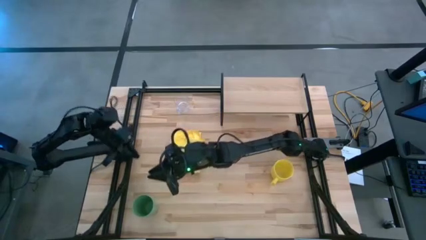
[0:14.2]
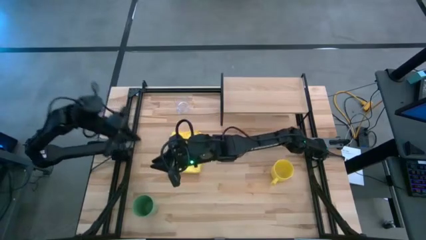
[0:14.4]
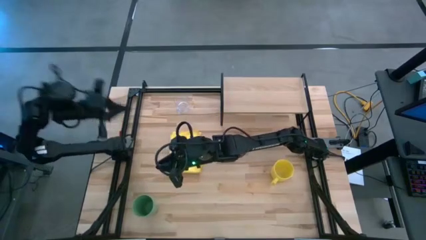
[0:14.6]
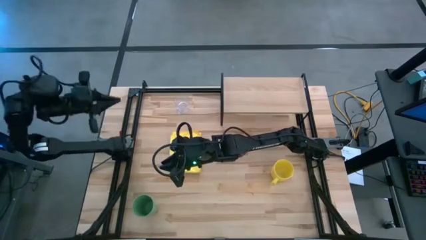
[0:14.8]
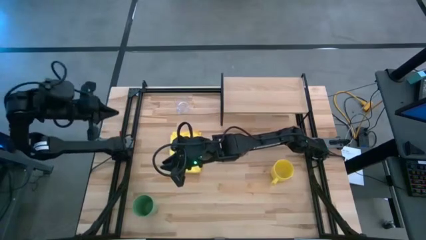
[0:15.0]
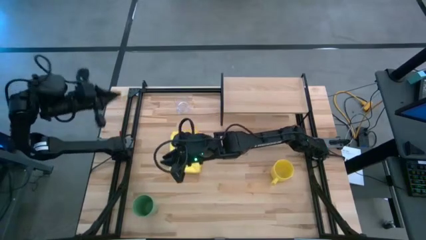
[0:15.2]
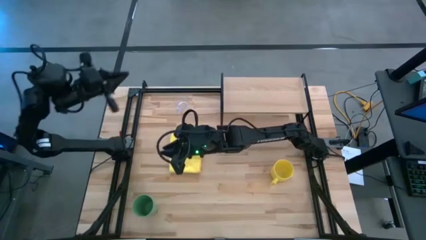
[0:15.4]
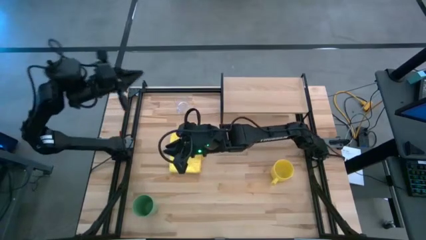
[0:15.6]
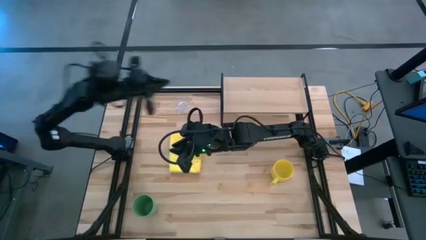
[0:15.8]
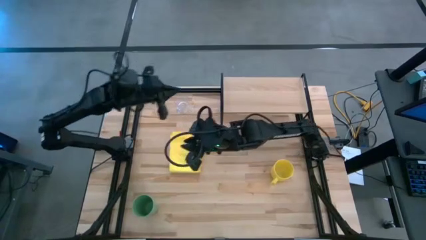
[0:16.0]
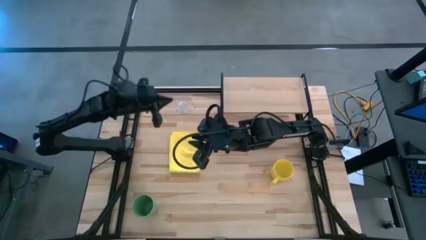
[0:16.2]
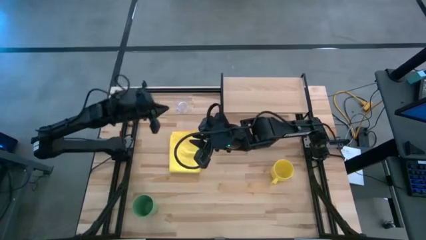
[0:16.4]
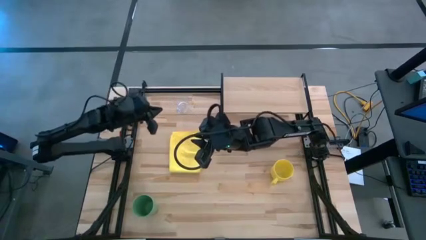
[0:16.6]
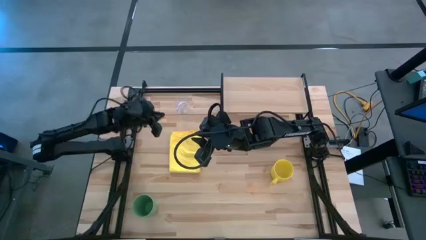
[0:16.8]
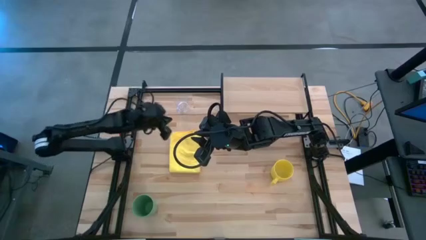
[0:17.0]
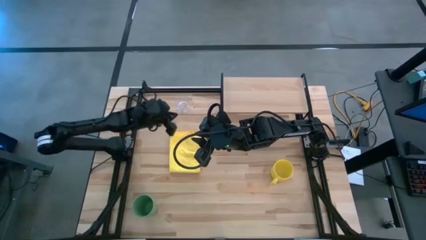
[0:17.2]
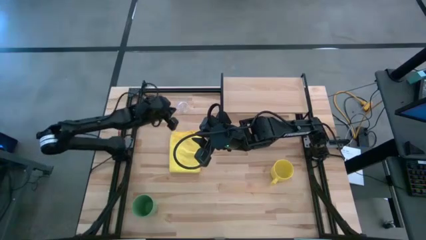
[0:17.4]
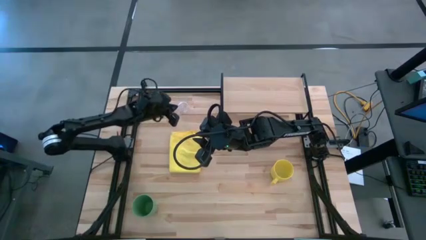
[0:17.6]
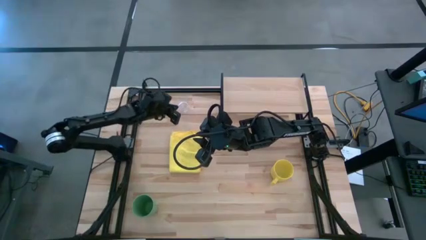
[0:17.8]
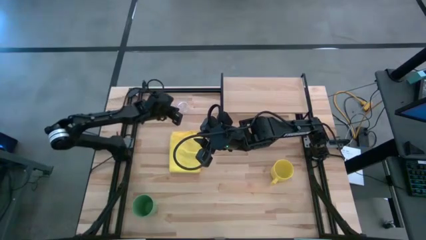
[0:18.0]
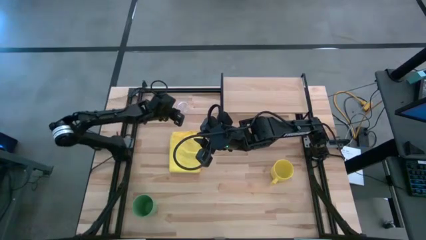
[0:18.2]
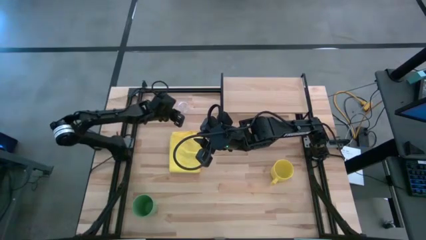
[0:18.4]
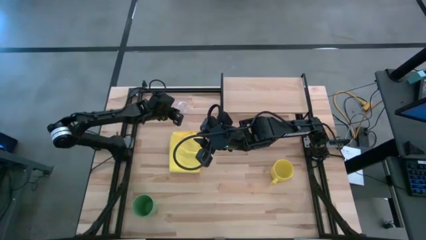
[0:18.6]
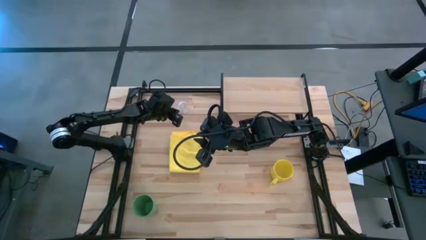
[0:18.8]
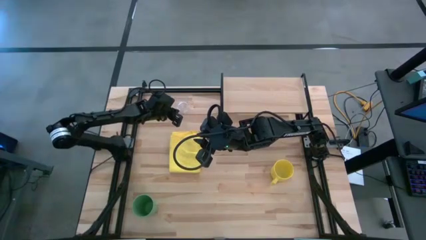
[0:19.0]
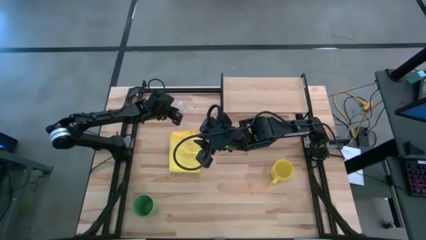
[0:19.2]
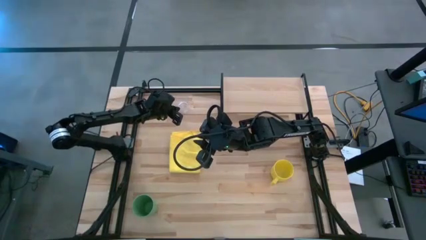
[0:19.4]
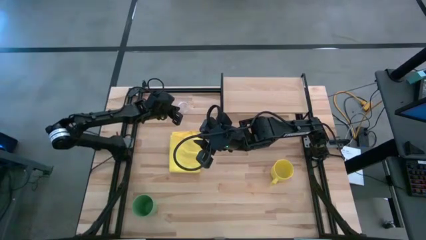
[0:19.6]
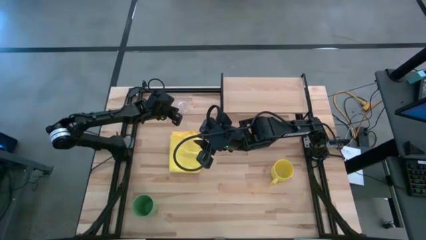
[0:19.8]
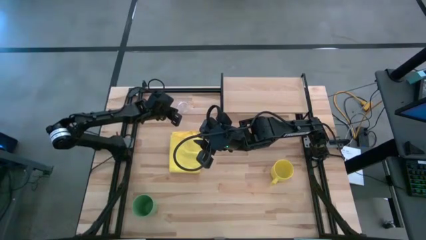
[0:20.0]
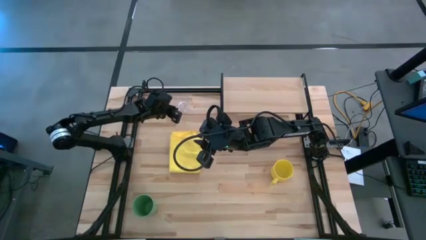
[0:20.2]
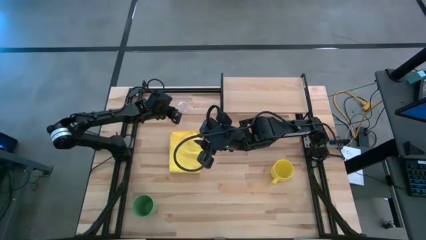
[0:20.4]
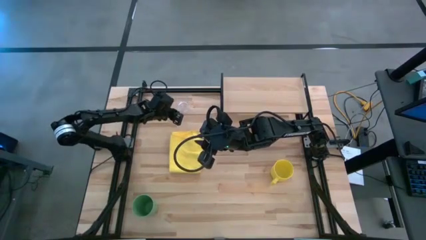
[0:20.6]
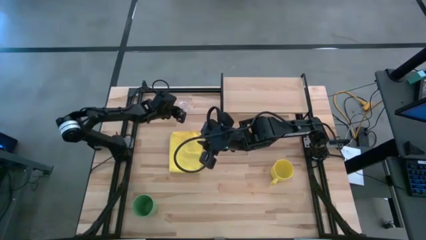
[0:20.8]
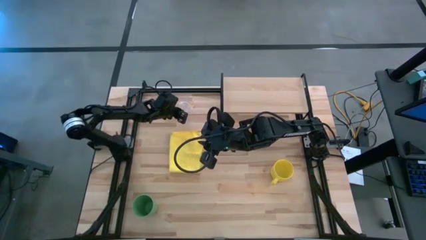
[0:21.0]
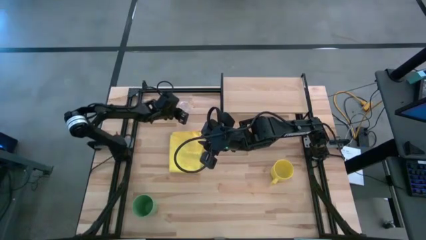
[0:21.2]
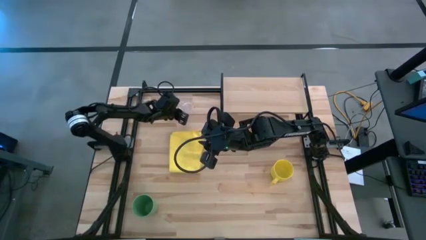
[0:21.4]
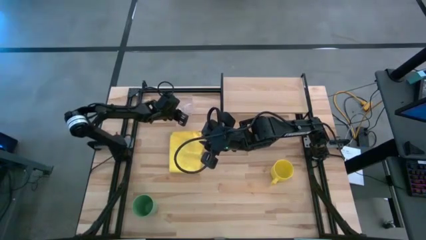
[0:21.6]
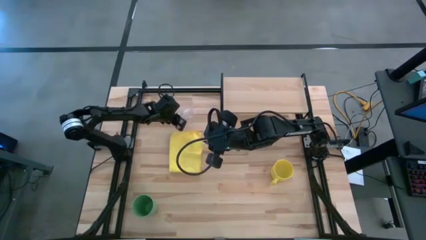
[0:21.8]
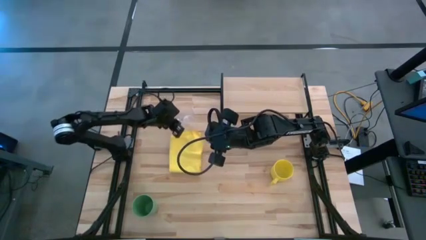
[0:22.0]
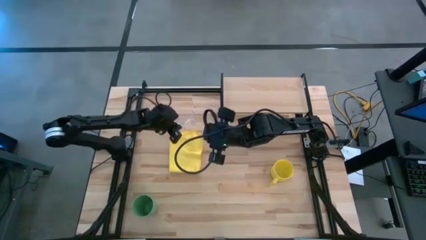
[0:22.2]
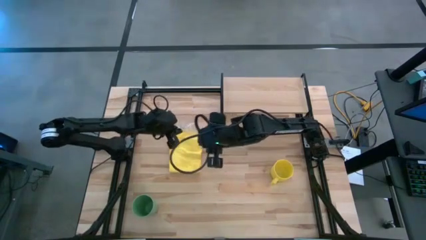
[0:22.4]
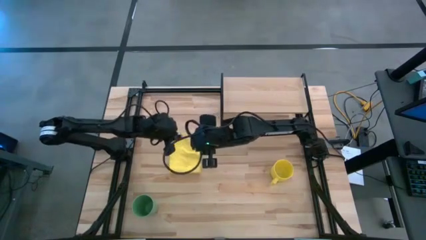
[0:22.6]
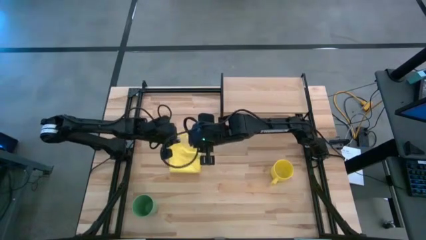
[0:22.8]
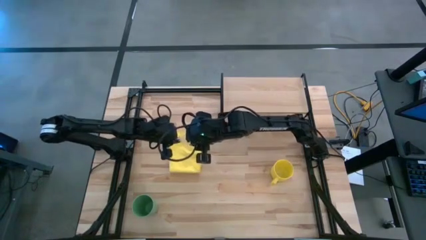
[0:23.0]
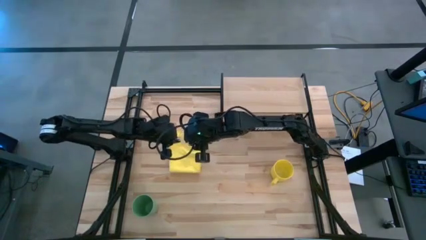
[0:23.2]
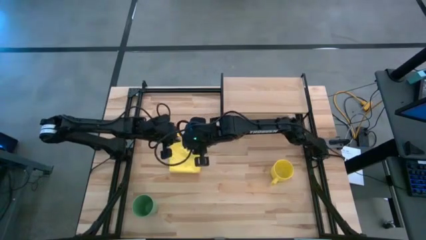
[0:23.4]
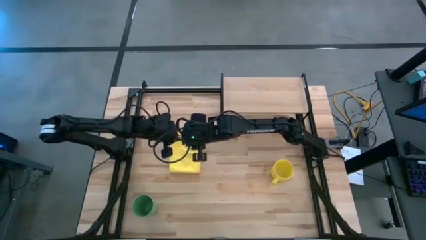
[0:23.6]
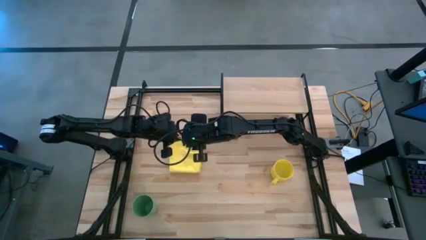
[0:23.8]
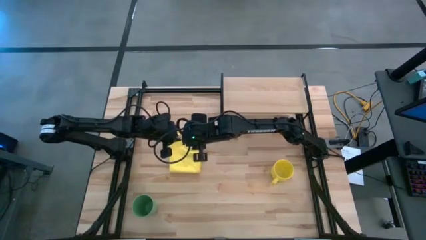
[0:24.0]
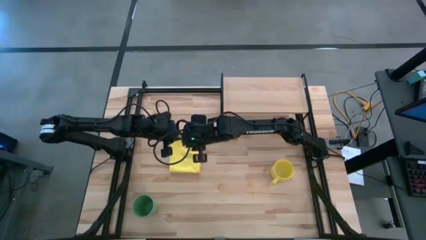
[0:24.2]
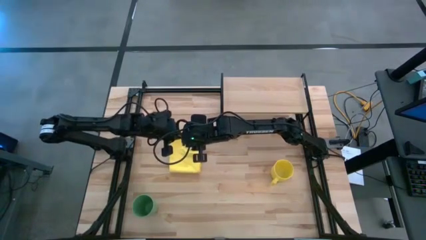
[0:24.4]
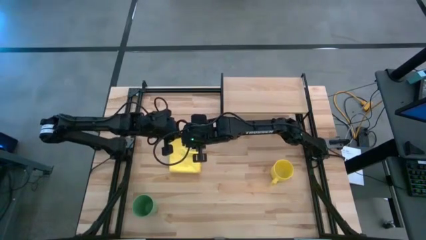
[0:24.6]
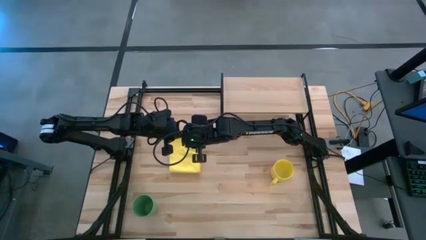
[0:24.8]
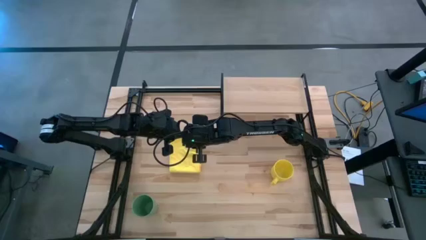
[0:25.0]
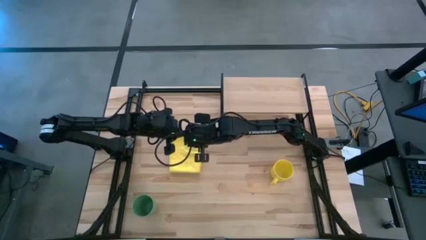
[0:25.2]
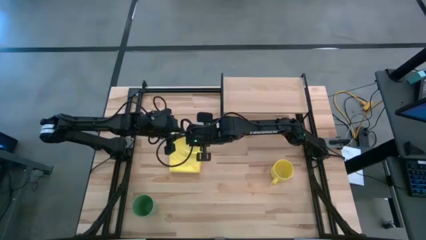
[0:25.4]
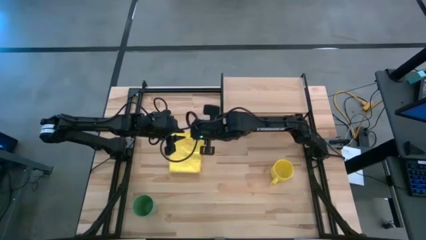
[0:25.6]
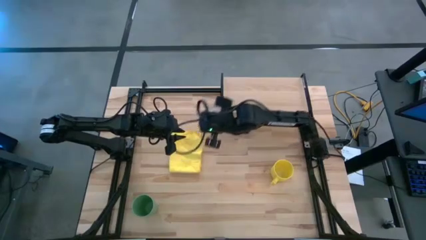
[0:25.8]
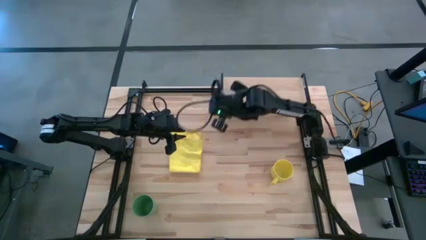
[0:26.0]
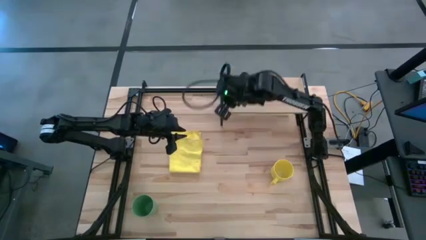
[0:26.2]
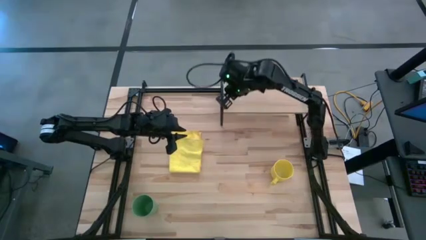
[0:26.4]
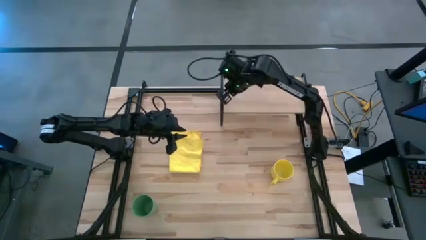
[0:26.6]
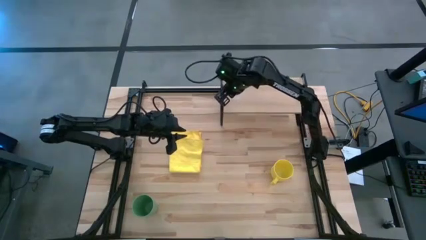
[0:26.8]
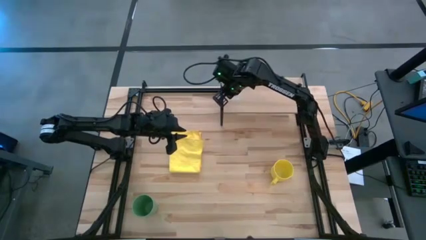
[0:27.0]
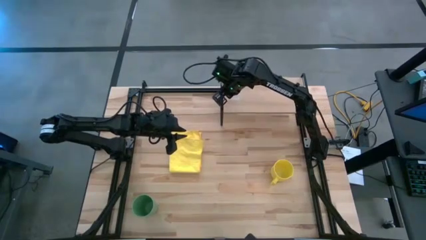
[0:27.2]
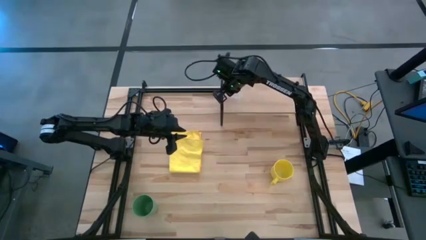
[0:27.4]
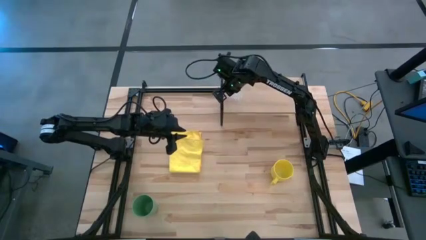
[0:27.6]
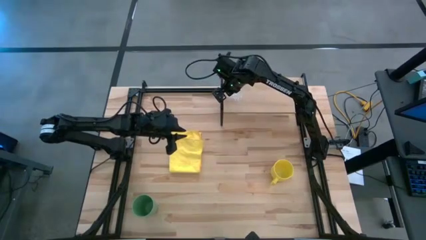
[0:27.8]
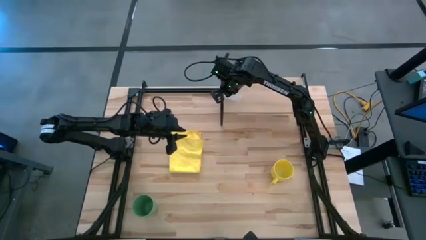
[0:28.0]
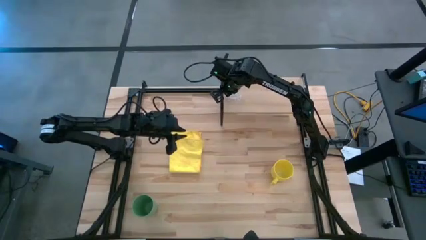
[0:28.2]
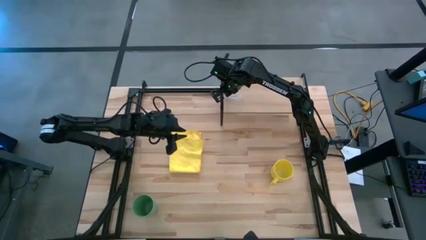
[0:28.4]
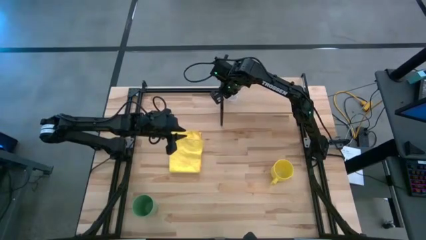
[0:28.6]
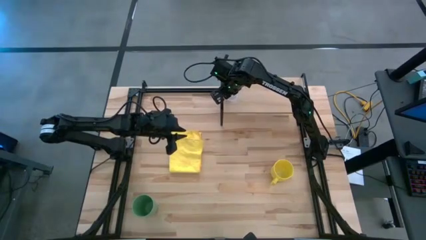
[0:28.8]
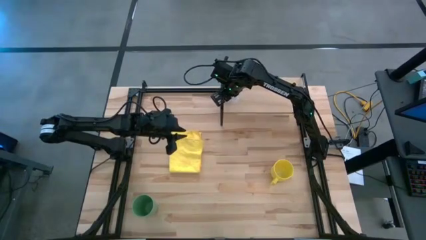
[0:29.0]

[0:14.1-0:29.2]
Task: Stack small to large cups/mugs on shelf
Put the transparent mug on the shelf

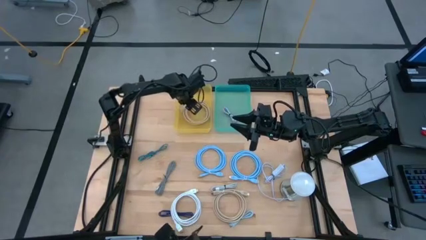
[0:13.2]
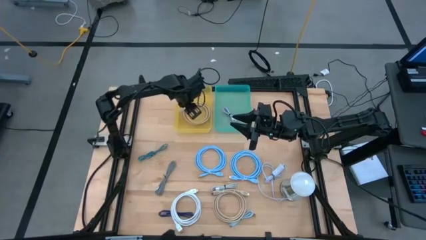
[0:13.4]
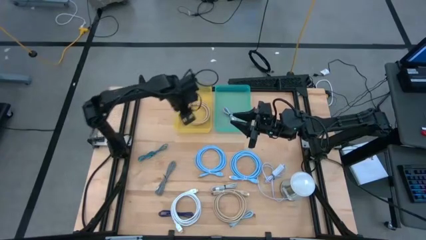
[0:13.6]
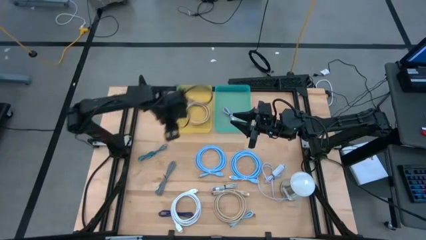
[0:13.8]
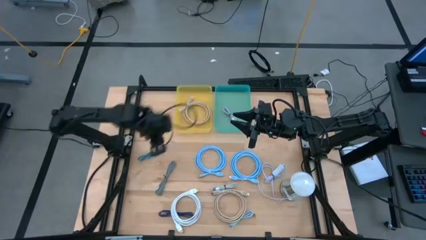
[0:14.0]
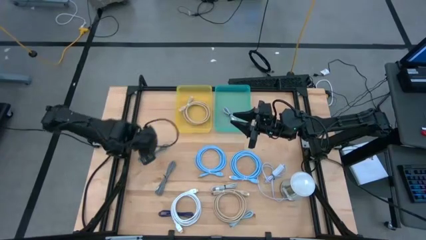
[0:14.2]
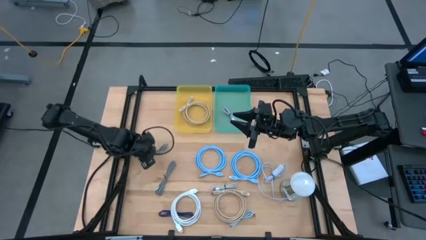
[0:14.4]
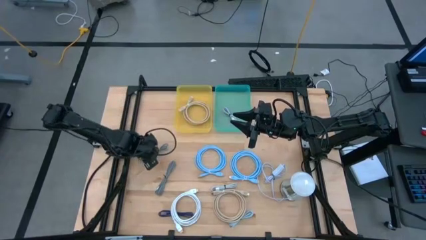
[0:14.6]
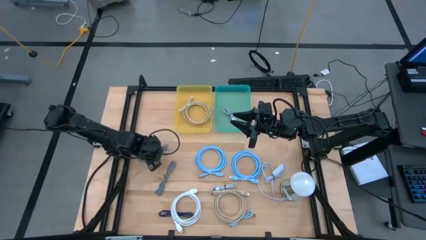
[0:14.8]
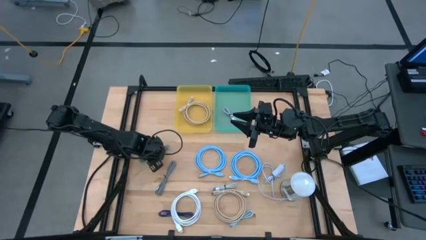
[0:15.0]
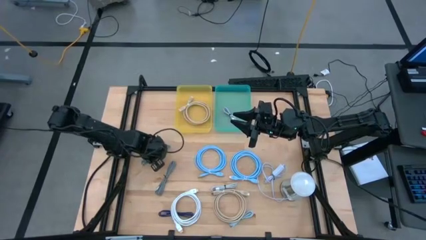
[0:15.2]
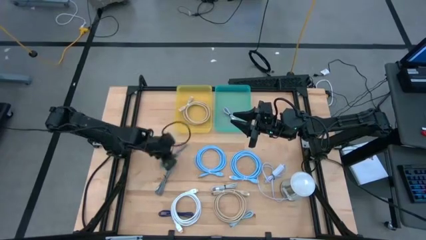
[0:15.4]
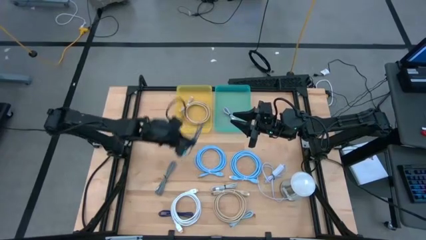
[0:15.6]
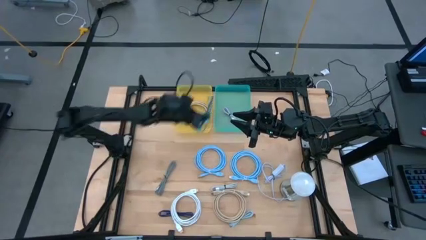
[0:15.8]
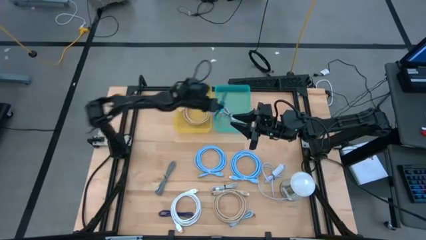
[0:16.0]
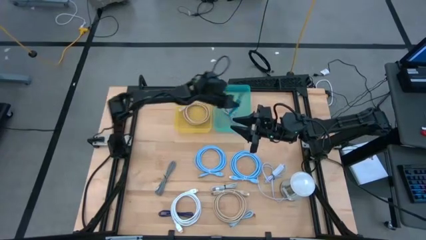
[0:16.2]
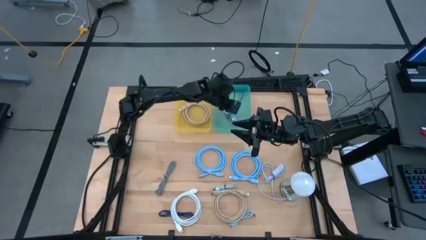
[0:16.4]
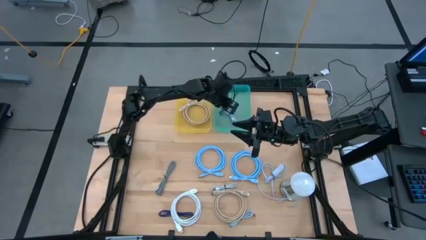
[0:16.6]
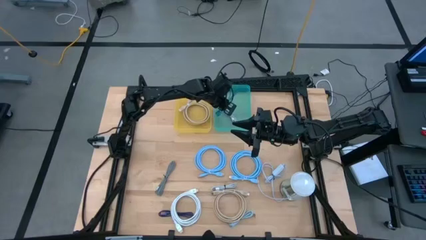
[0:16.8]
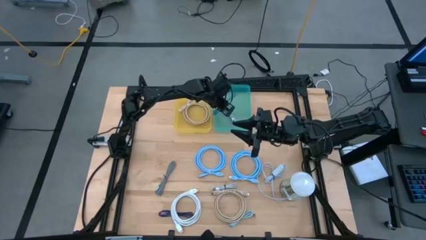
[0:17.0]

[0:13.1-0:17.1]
Task: Pick & Place USB Port
Put the black and blue charger cable into the green bin
